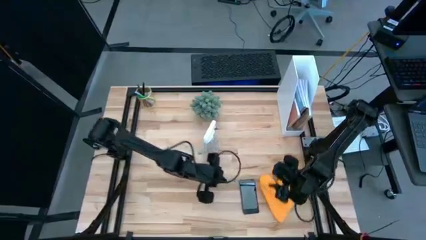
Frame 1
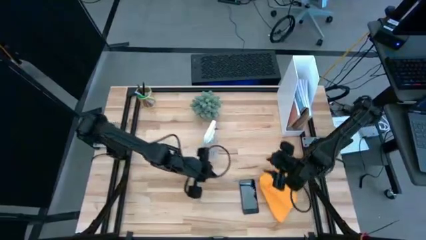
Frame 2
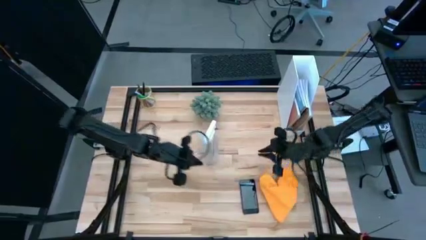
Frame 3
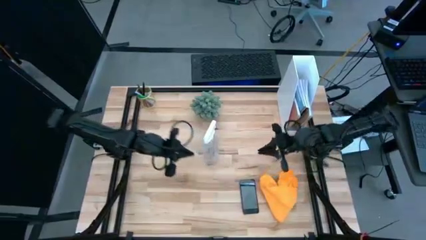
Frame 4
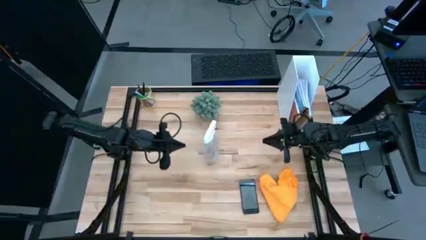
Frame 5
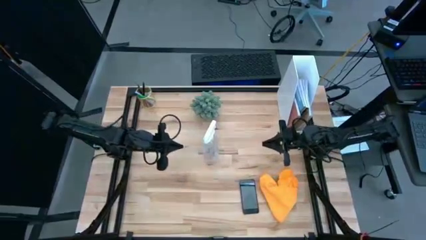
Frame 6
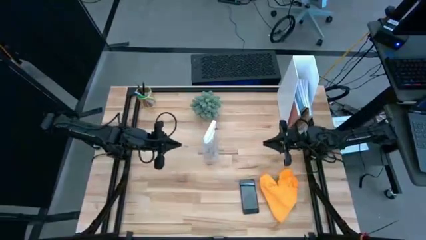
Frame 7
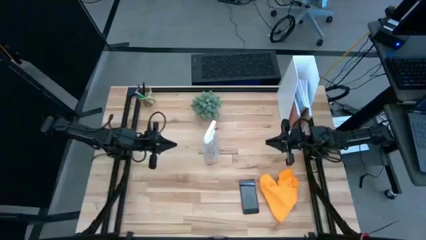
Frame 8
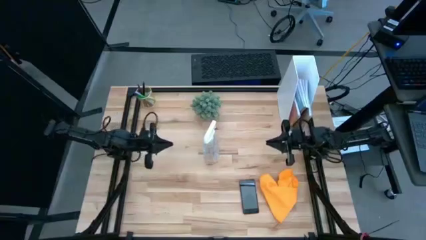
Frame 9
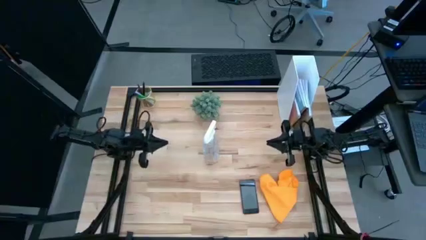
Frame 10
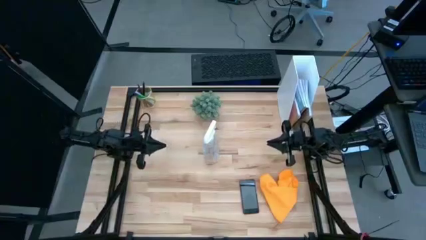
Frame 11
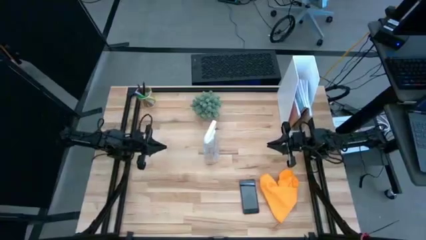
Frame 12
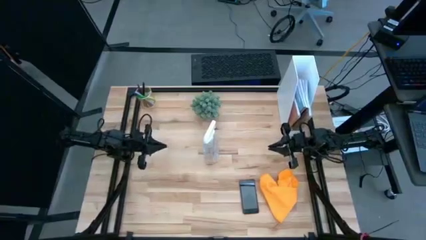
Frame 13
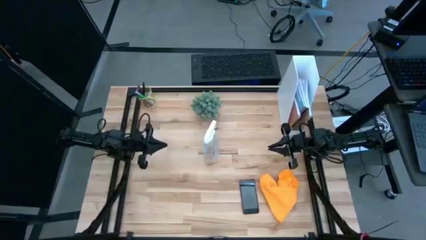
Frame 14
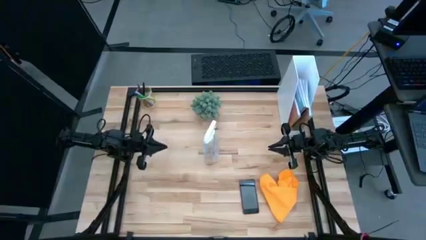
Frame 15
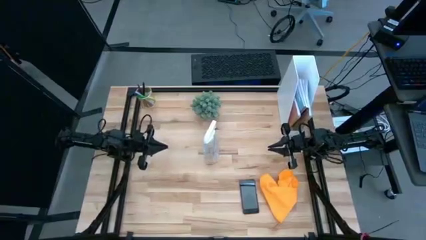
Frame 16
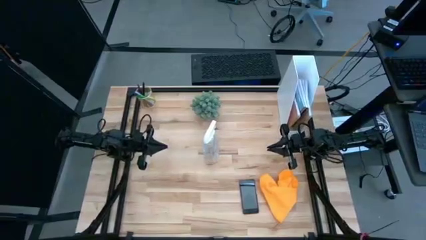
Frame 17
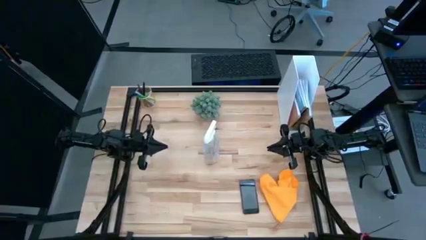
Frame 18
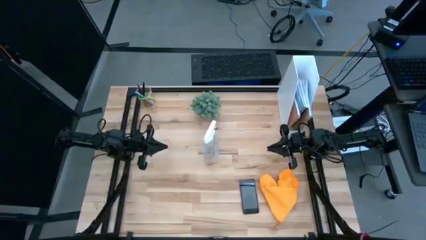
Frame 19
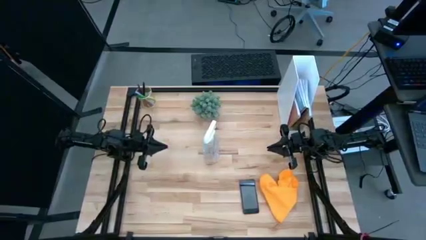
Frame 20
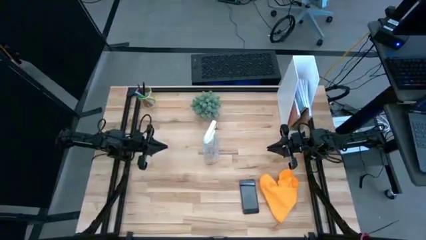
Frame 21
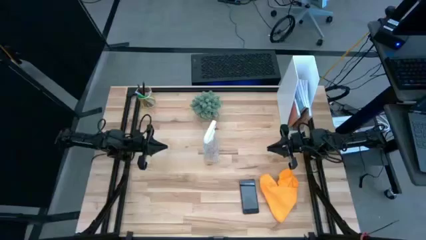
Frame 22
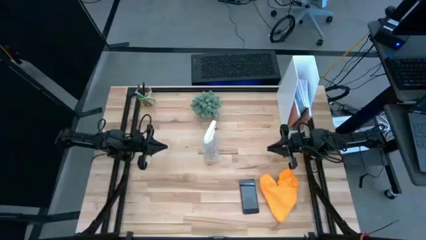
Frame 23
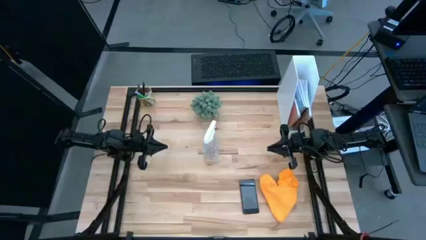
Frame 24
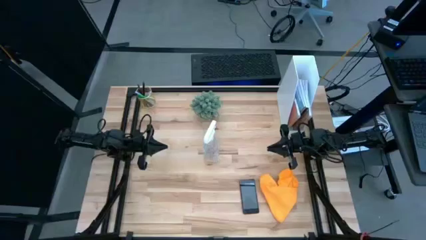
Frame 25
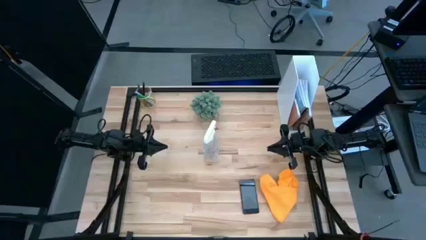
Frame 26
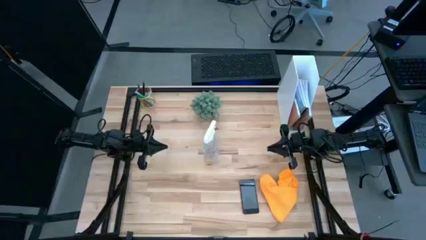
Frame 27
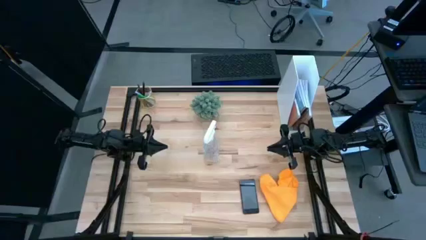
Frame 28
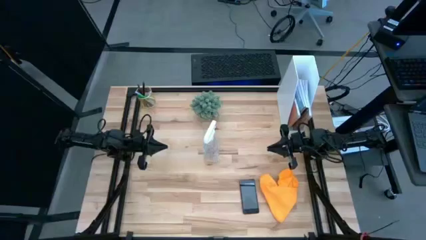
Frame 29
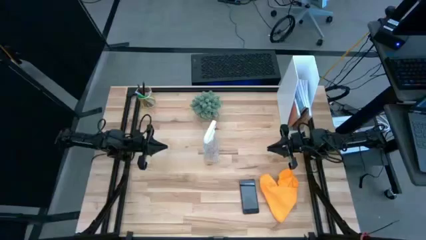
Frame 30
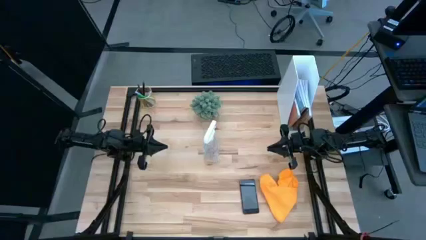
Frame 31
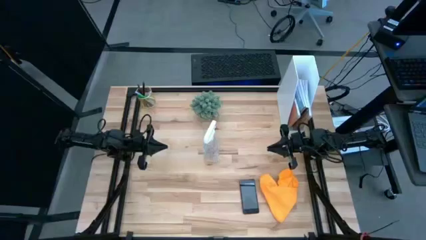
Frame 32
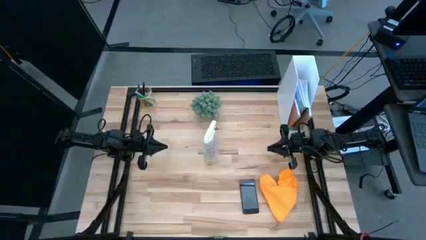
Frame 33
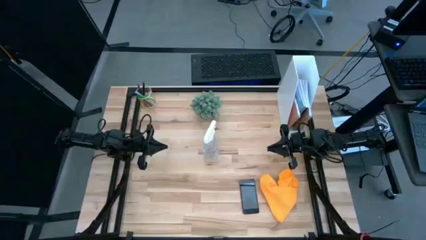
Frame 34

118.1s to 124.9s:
Task: Apply microfiber cloth
Return to Home Position

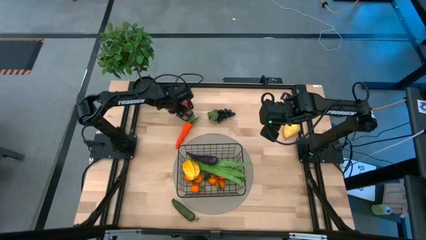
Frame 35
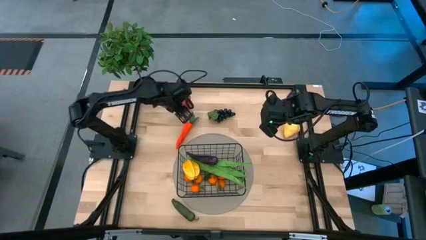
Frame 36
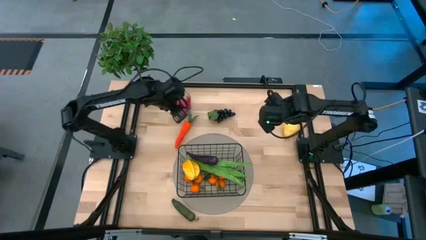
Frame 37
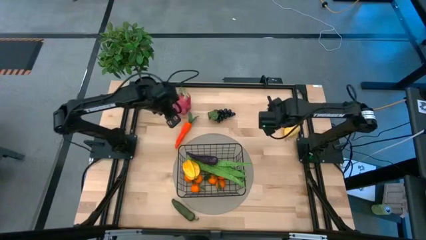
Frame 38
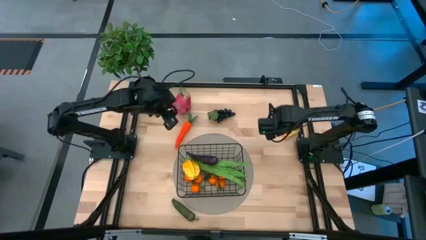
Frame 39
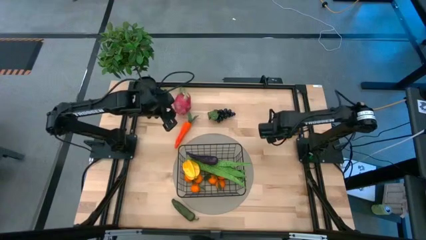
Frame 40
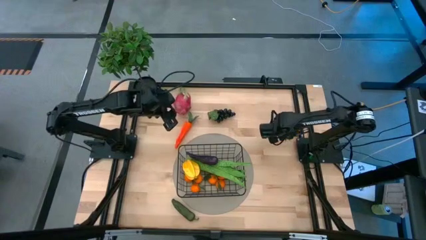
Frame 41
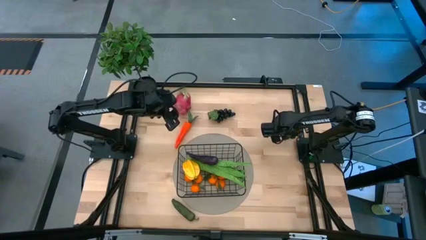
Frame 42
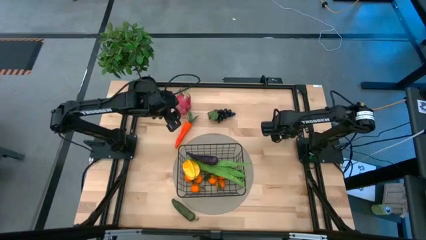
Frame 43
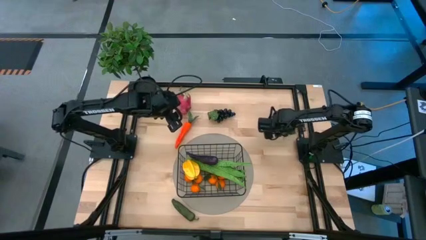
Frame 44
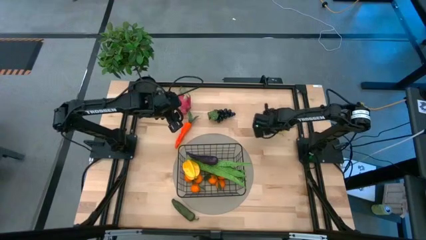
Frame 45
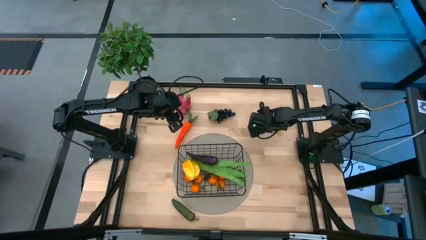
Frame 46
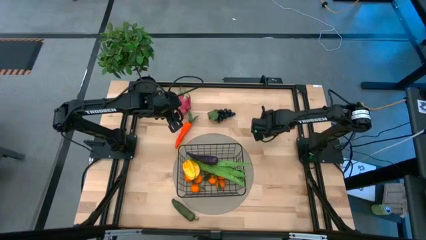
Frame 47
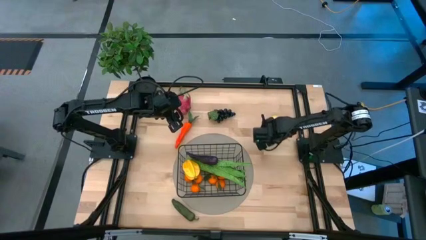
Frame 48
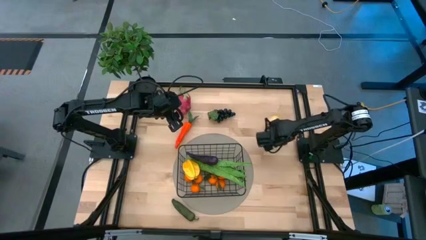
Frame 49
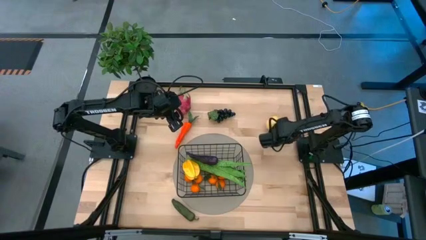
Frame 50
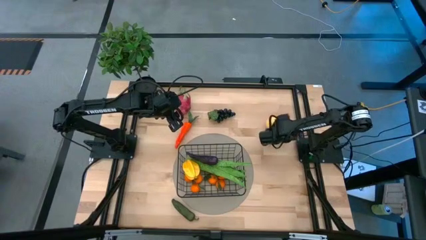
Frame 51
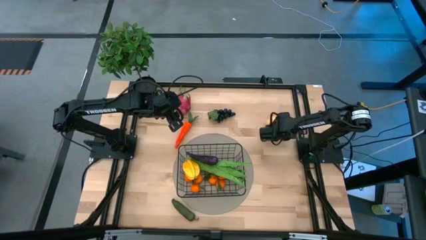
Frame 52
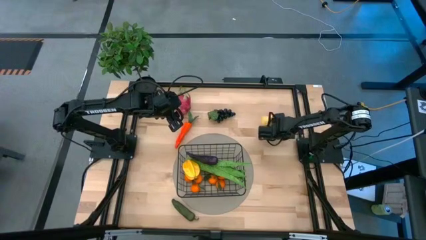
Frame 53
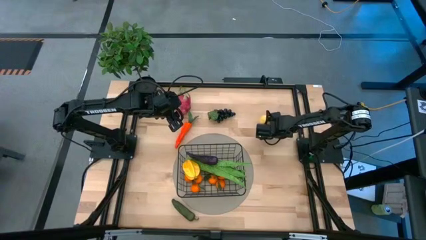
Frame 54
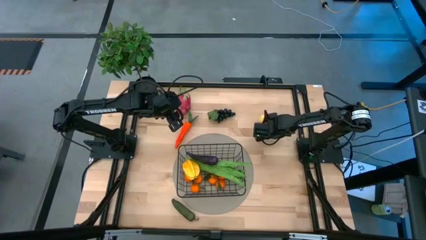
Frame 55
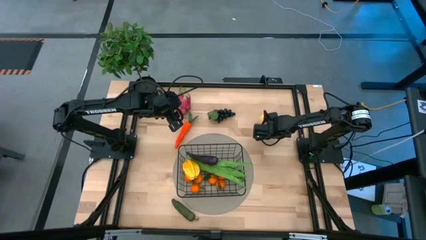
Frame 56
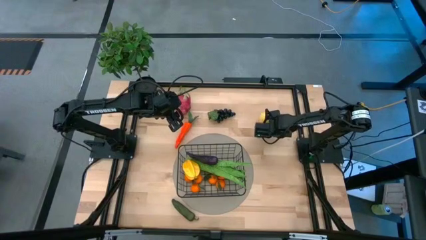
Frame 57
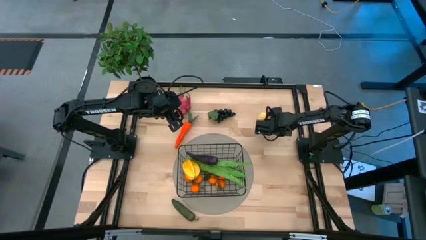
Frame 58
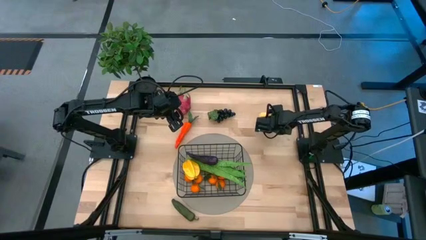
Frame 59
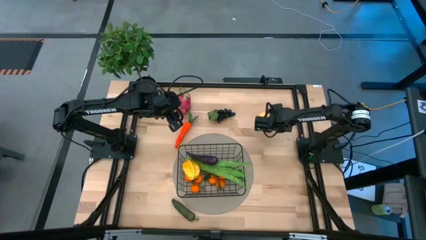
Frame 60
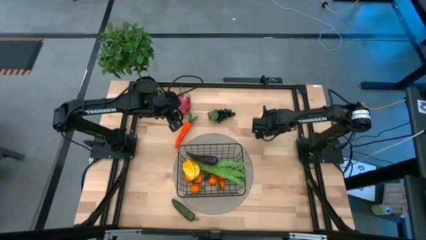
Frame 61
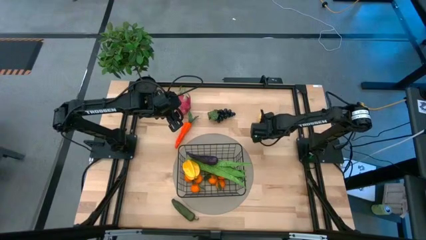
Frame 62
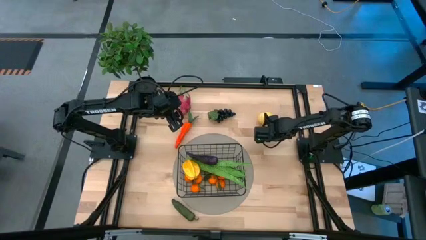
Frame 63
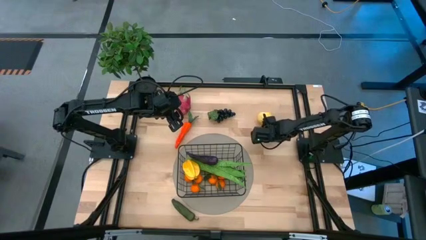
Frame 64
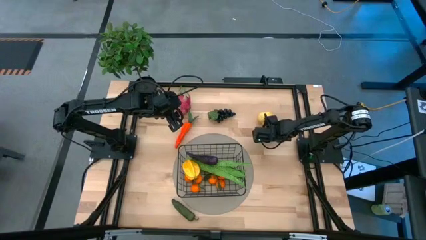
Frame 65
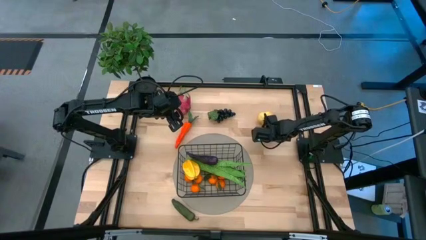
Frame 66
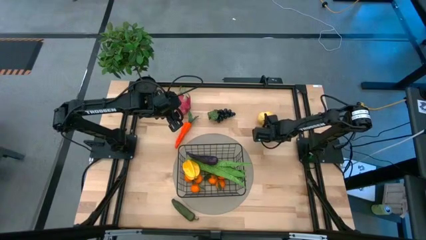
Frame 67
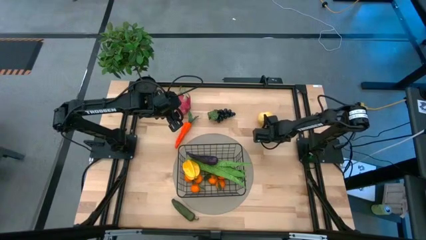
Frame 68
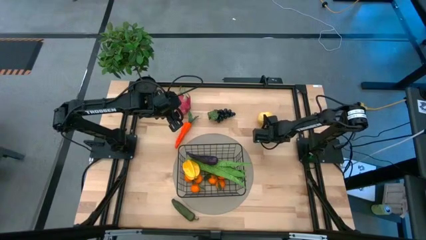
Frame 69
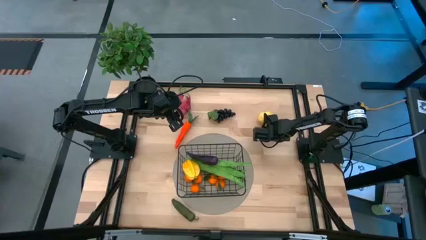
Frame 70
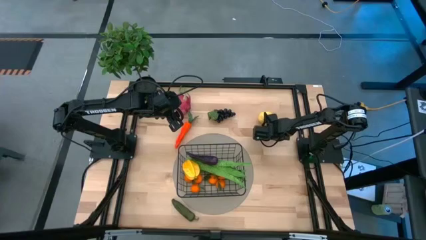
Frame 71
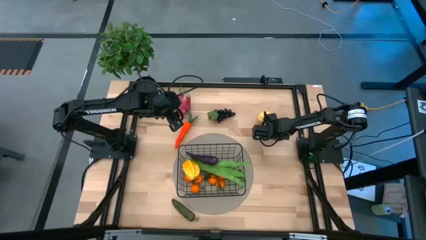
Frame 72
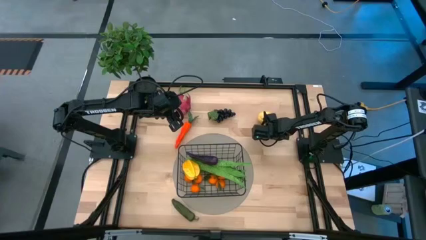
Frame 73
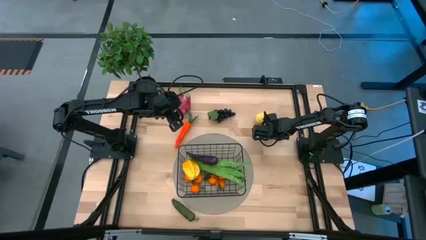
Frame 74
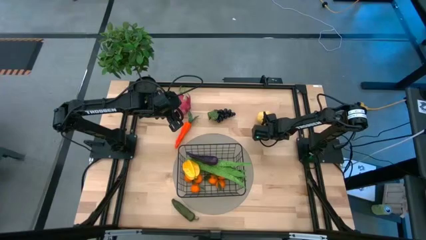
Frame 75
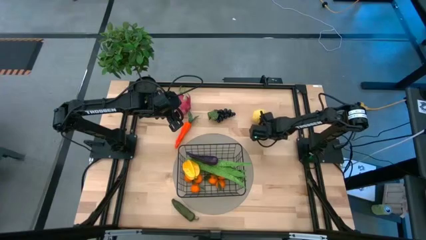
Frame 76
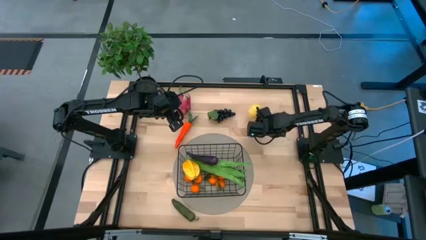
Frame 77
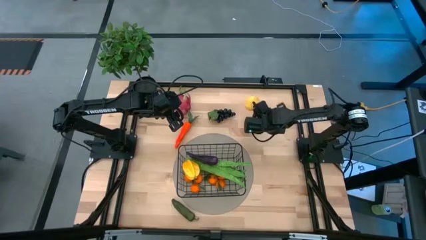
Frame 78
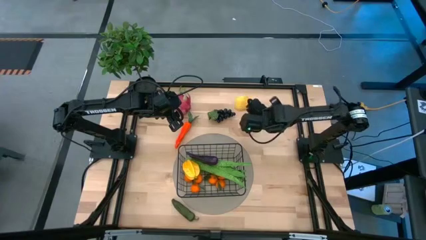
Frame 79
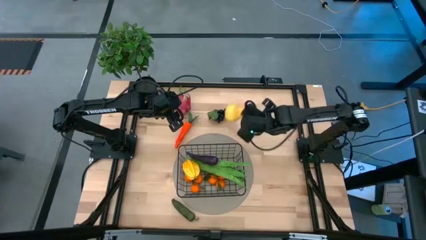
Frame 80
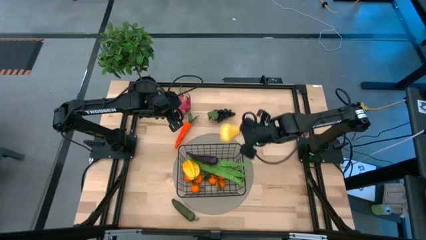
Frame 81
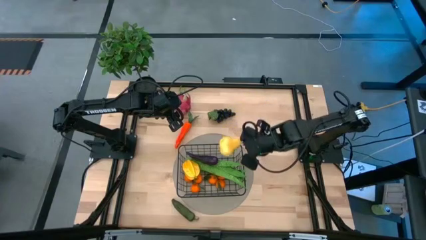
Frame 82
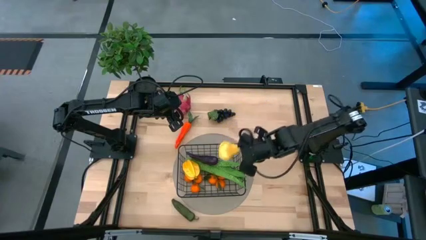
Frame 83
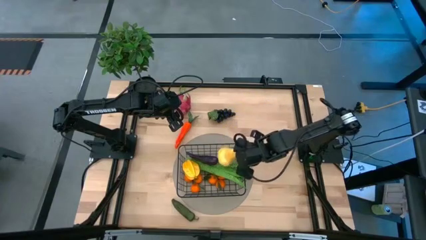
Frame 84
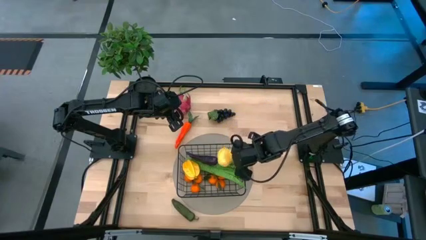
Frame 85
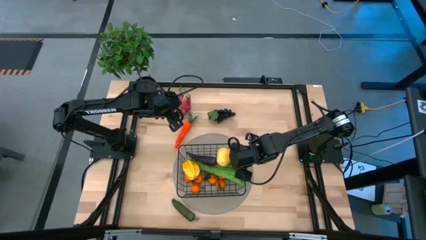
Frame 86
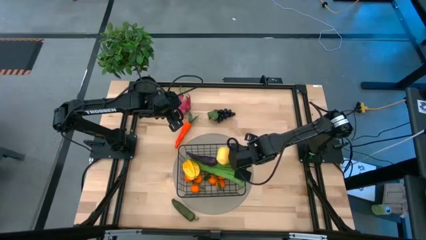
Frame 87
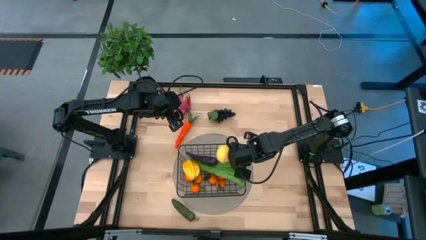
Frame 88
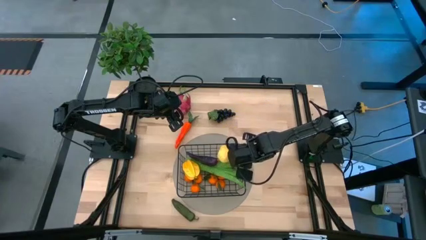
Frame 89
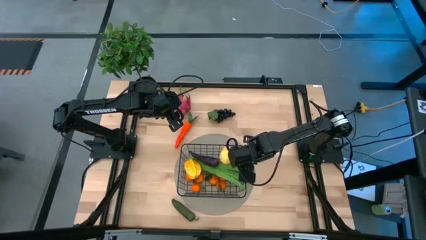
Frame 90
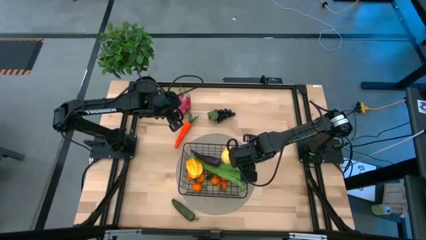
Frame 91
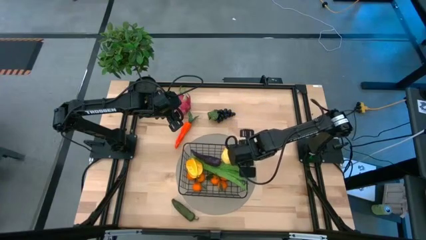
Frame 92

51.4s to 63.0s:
Task: Build produce basket
Put the pear into the black basket
